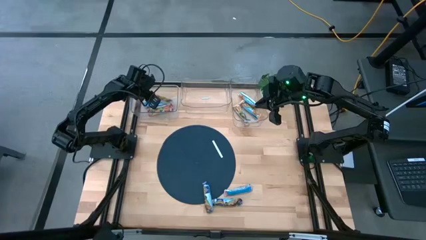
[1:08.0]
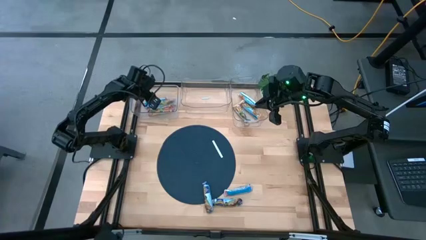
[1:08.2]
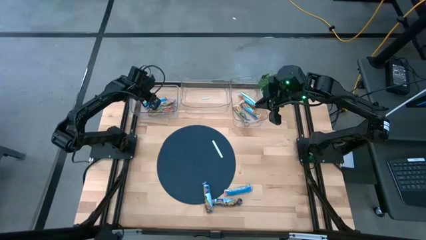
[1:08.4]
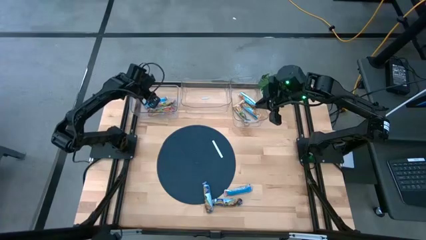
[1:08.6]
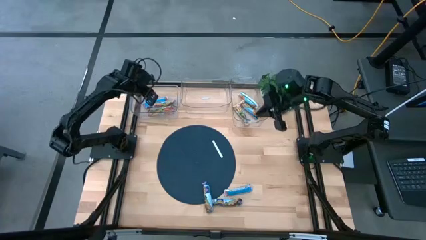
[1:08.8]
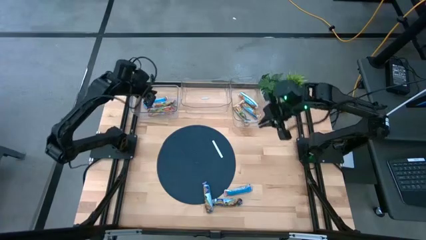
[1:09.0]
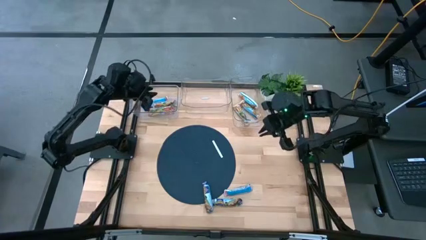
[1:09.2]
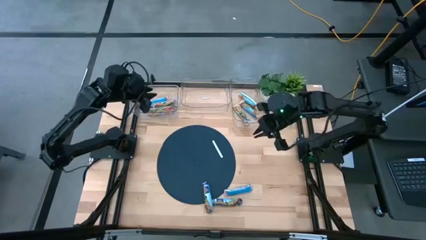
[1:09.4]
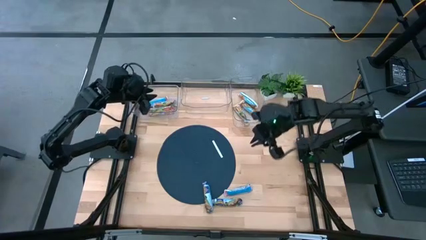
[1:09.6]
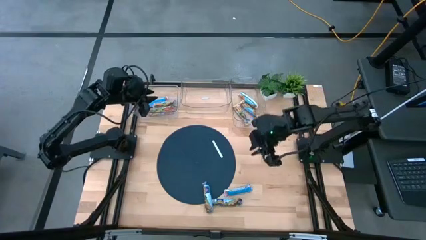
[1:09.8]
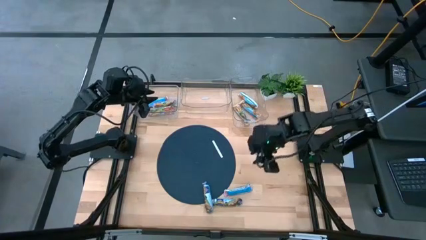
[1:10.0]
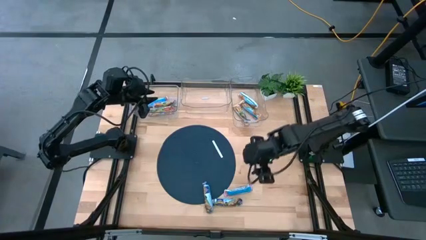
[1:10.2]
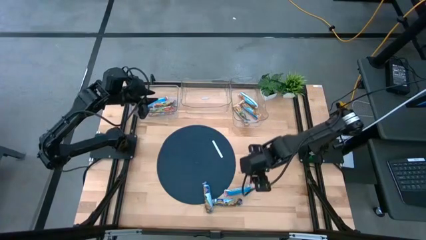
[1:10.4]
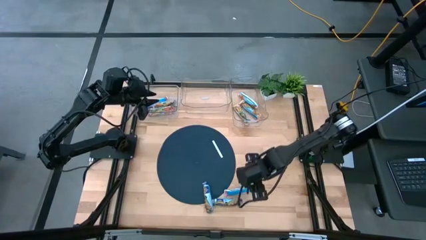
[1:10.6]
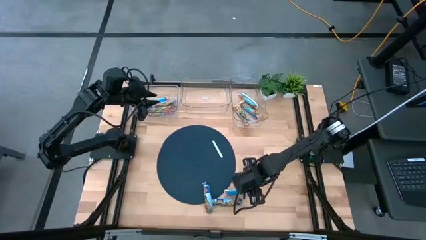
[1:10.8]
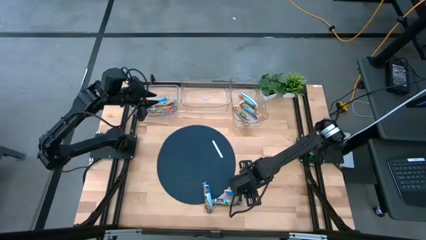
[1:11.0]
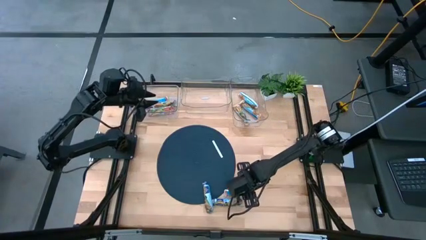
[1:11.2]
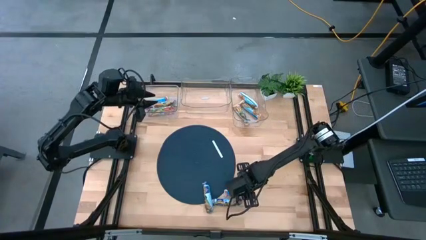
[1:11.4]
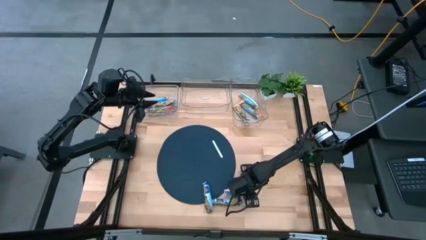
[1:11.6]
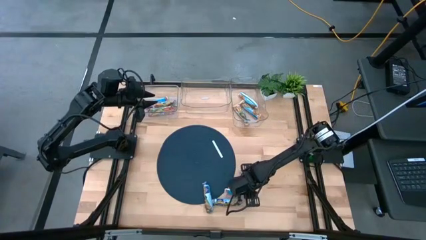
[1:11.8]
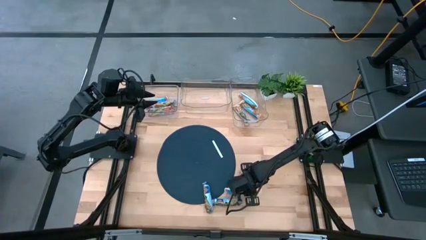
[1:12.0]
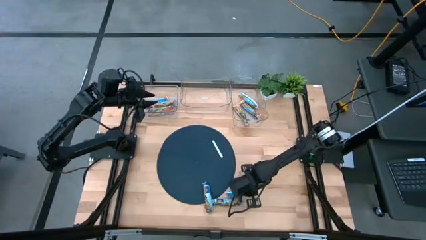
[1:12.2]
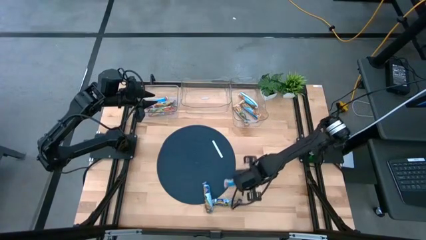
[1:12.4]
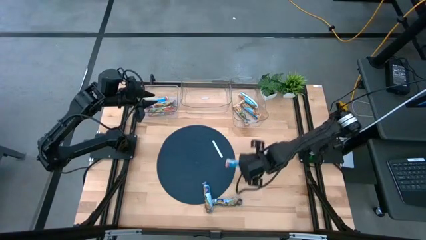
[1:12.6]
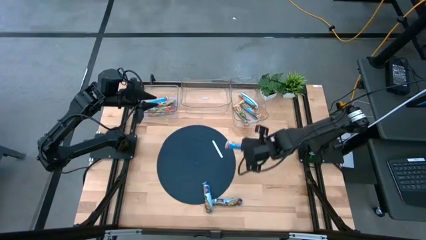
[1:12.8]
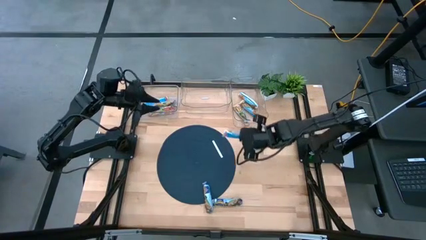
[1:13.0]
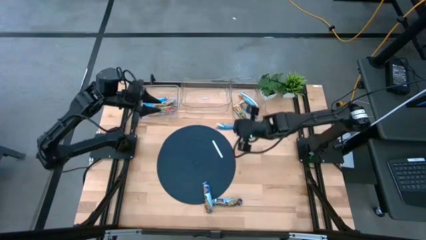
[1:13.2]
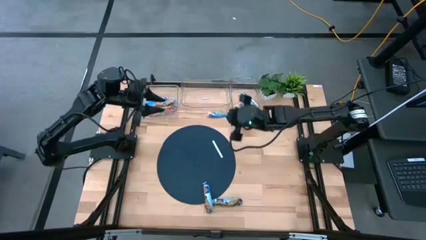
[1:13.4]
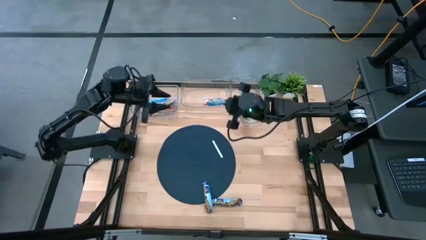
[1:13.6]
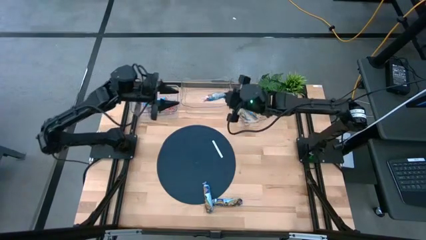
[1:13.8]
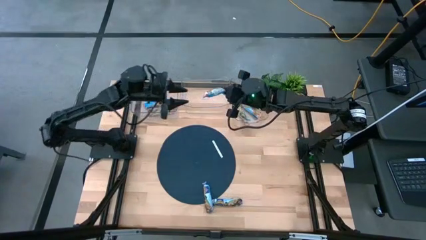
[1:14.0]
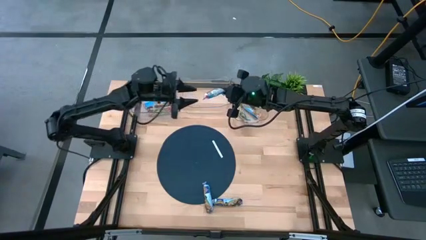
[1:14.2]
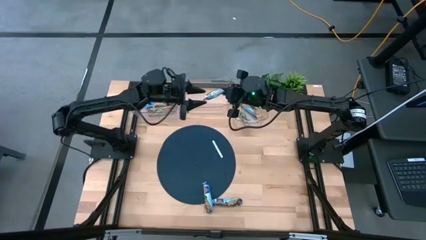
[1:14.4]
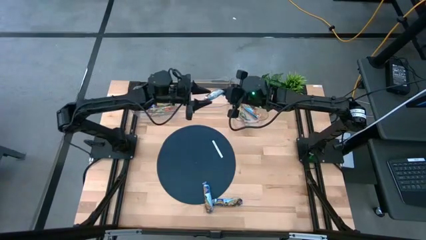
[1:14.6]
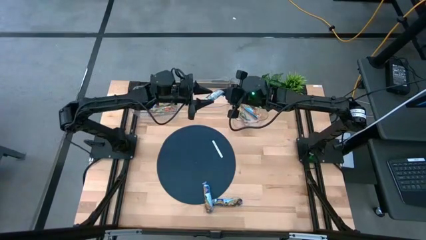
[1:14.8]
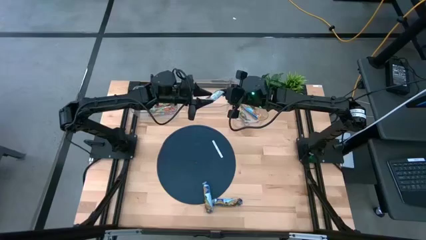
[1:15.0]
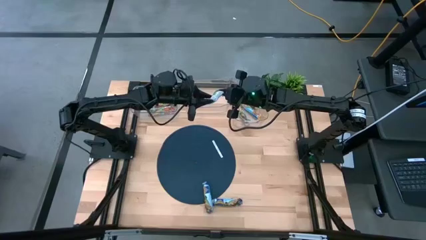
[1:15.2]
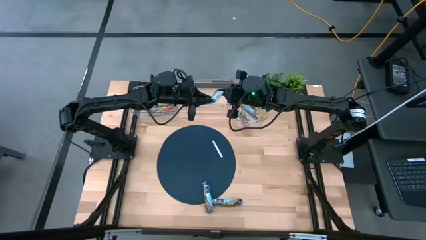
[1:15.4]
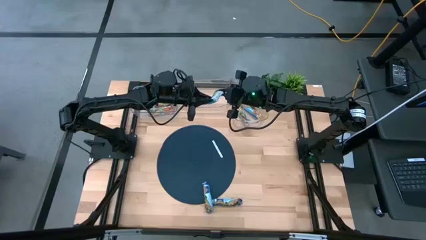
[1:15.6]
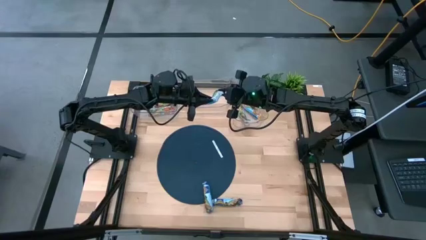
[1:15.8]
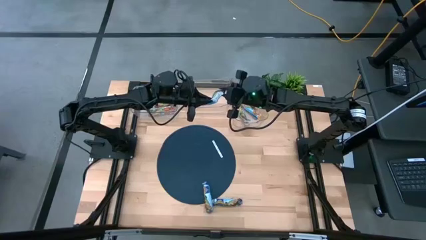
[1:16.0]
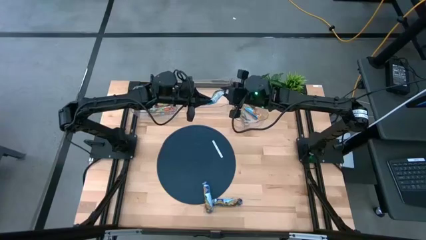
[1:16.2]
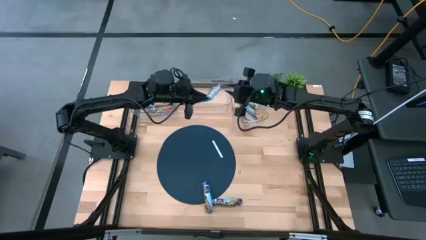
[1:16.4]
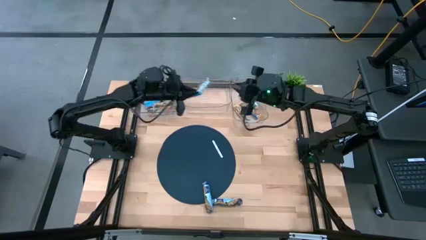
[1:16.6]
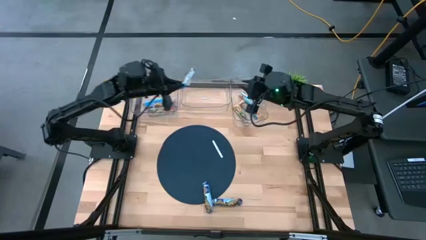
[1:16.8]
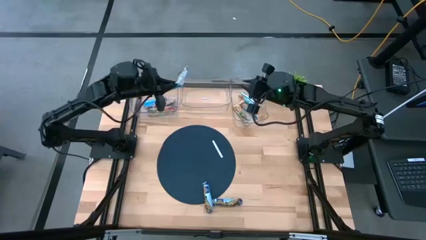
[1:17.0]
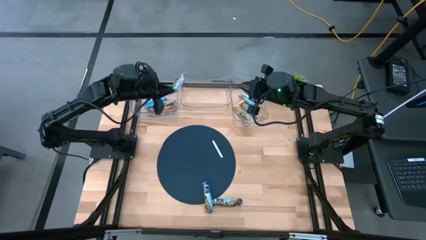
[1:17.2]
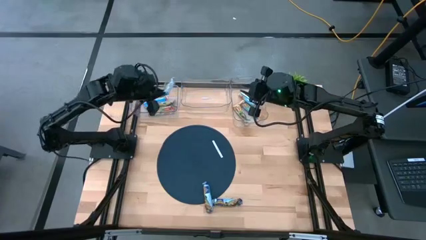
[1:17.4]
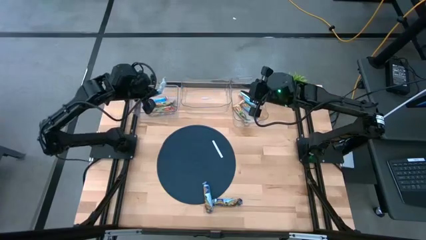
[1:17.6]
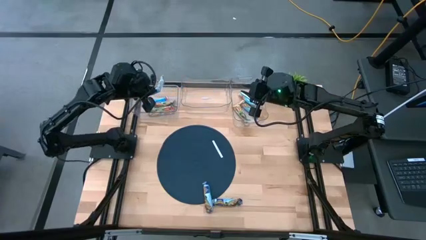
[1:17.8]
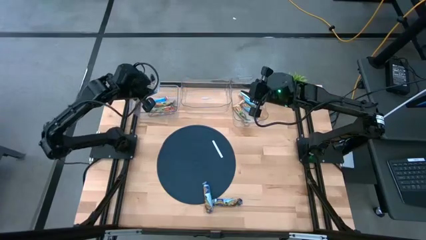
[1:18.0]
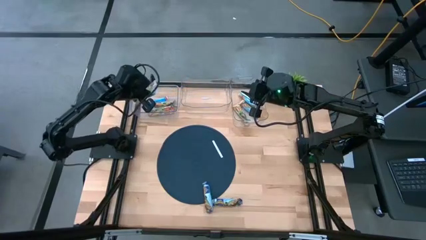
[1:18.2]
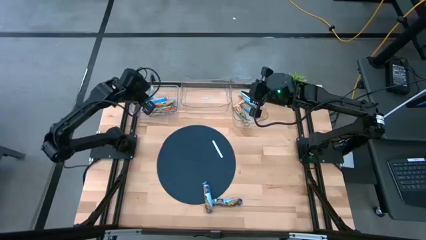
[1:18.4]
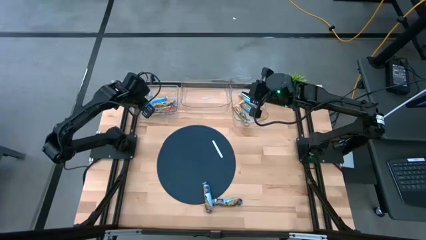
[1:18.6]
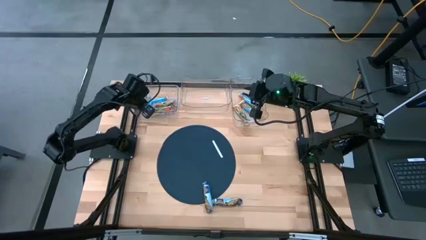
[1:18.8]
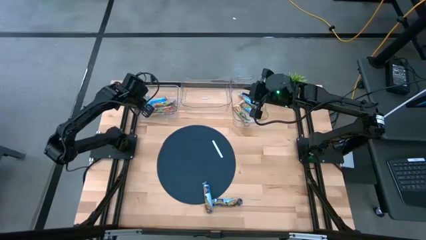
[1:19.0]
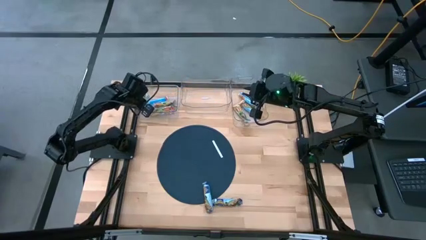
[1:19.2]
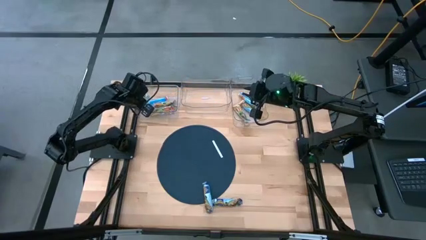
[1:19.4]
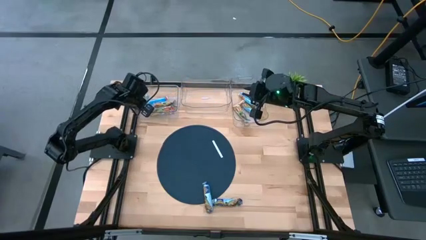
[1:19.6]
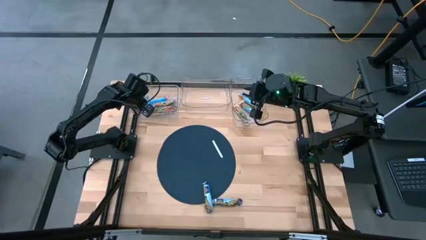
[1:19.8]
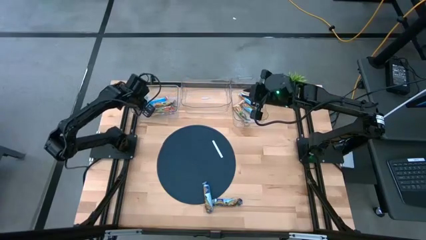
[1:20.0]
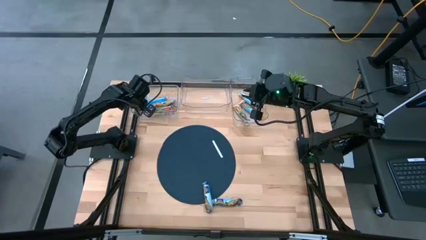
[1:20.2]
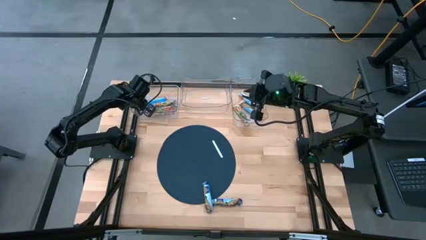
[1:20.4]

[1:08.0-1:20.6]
Task: Pick and place Granola Bars by type
Put the red chewy bar into the top left transparent bin

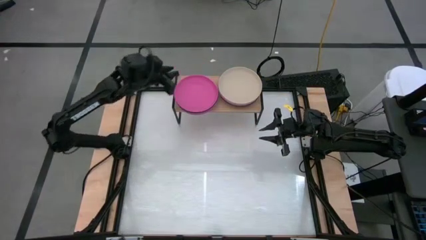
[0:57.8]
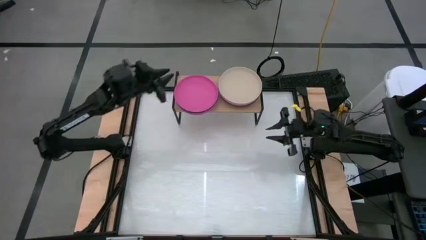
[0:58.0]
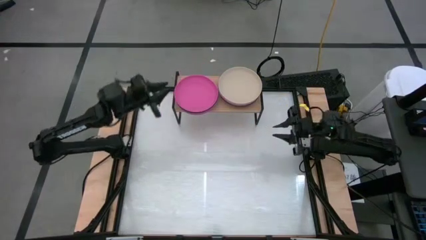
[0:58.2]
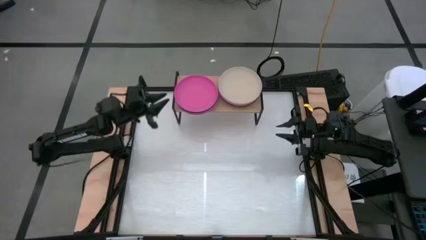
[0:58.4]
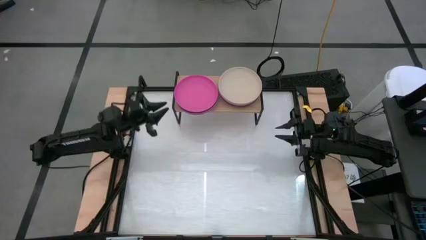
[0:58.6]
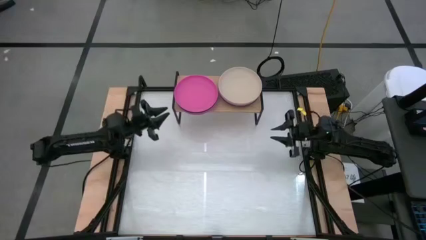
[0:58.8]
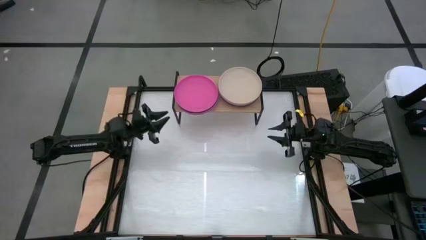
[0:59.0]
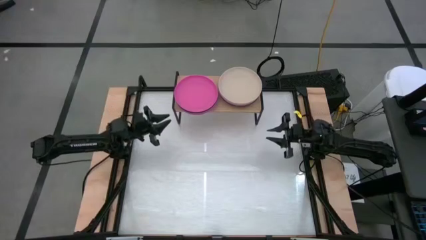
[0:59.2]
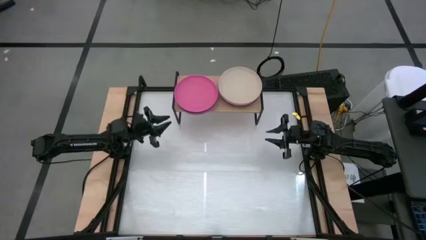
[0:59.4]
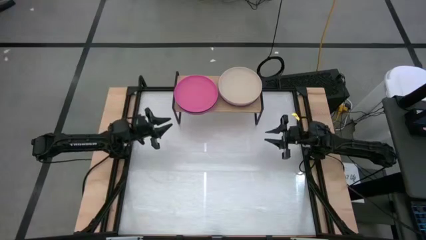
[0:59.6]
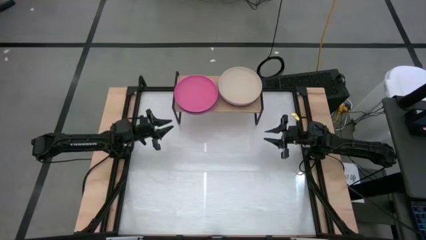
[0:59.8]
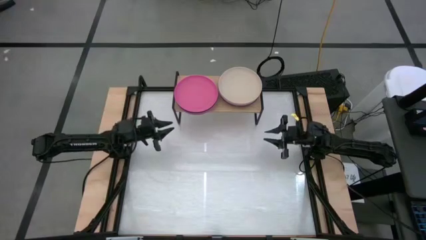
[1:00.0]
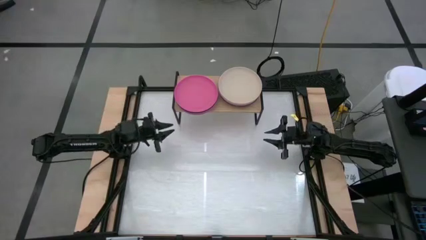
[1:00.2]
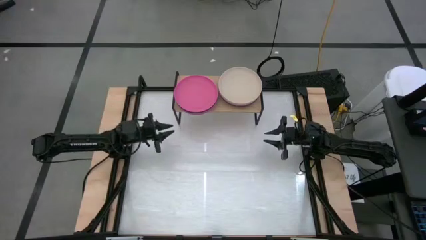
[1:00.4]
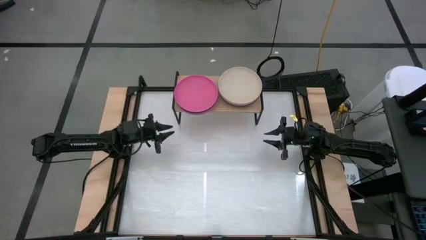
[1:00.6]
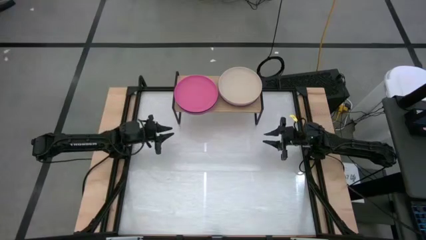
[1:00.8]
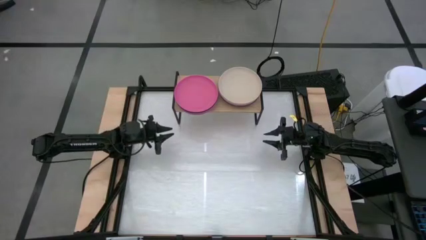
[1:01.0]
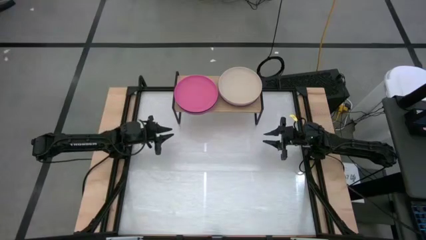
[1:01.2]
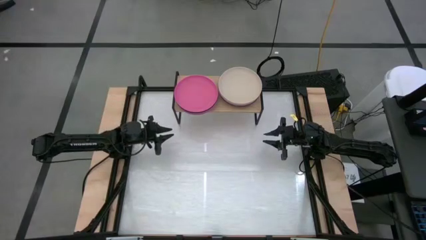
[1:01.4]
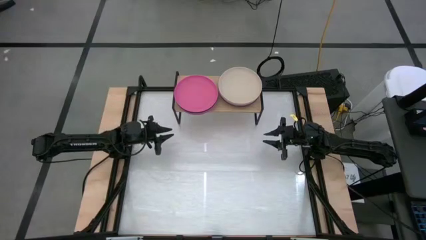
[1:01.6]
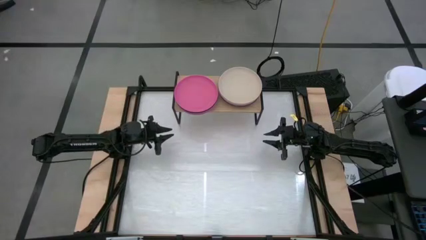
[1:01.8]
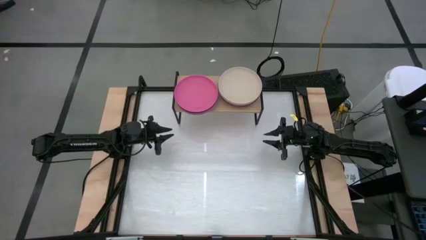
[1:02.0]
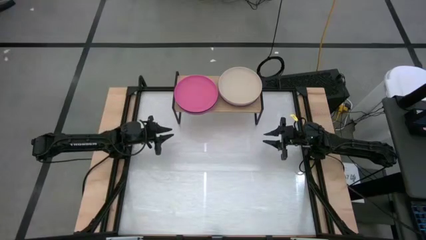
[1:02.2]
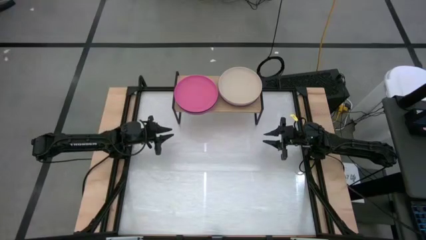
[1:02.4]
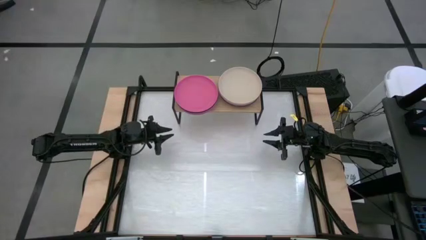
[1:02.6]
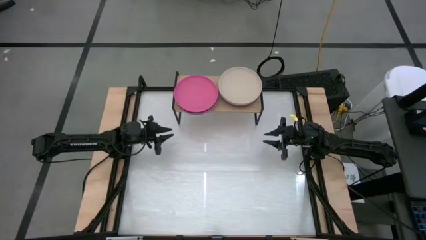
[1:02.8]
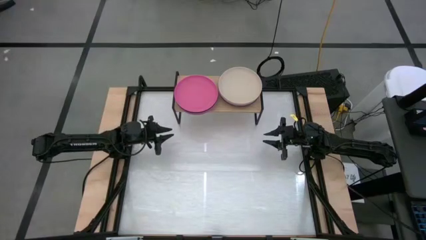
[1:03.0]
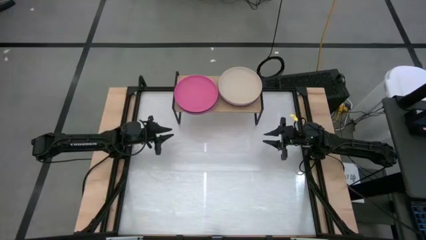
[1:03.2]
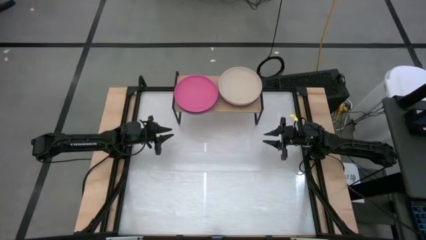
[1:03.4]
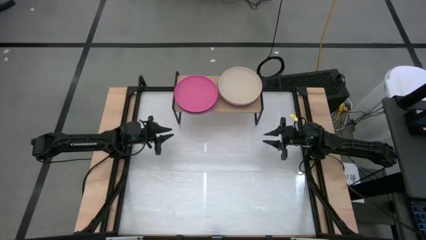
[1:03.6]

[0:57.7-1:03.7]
Task: Place and stack plates onto a shelf
Return to Home Position
